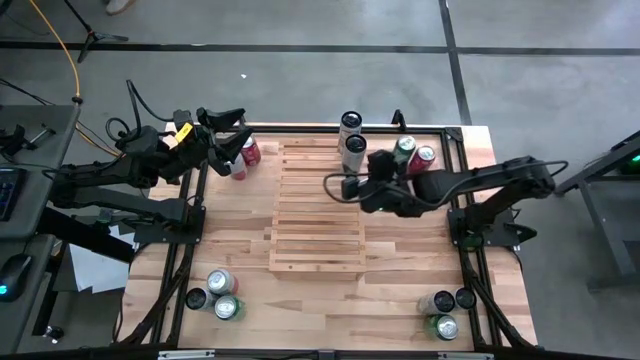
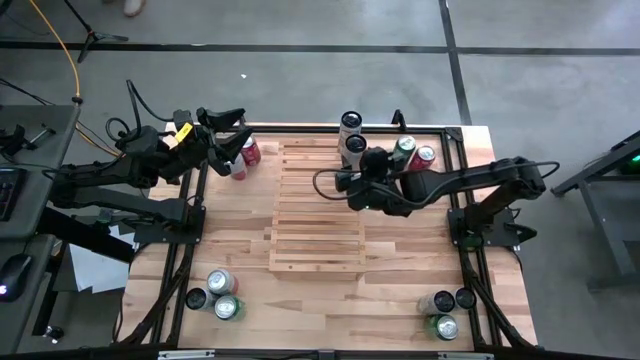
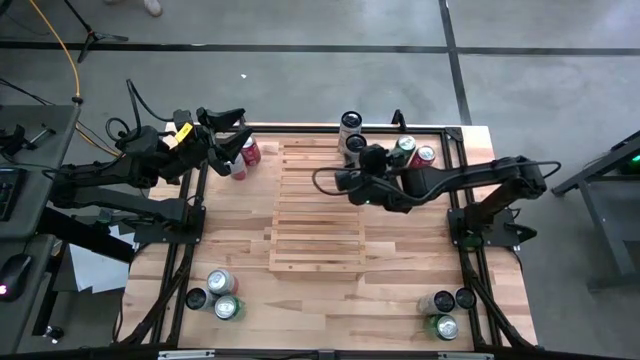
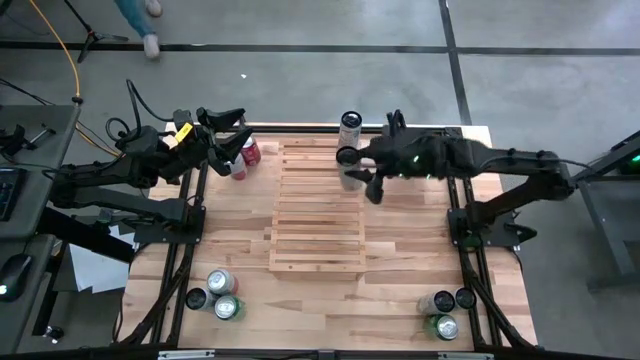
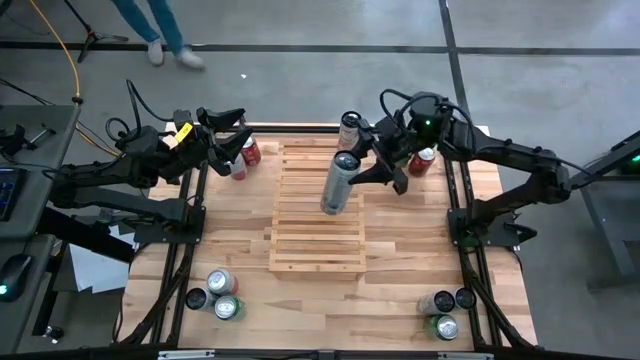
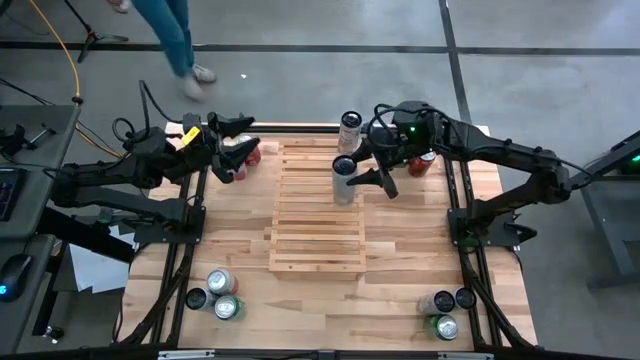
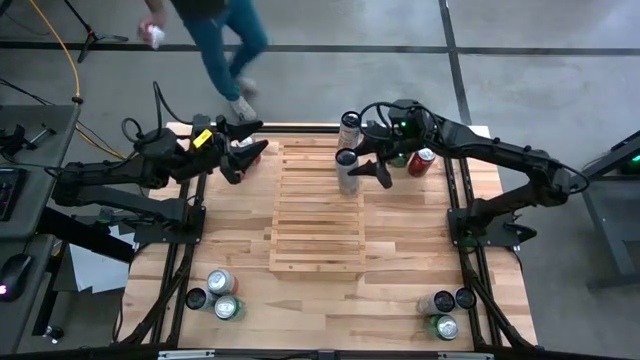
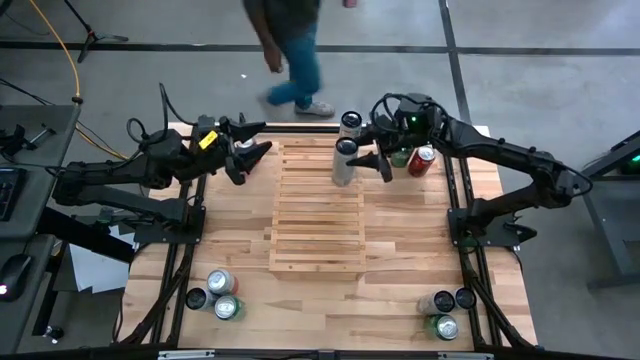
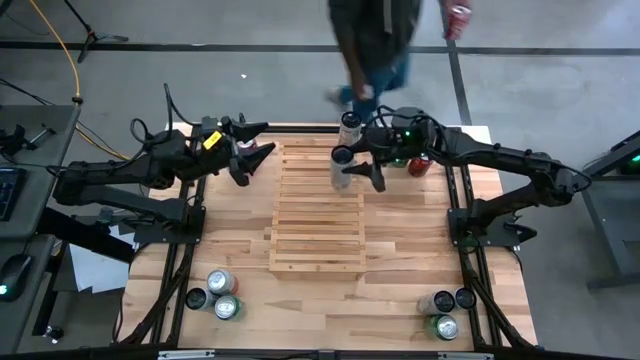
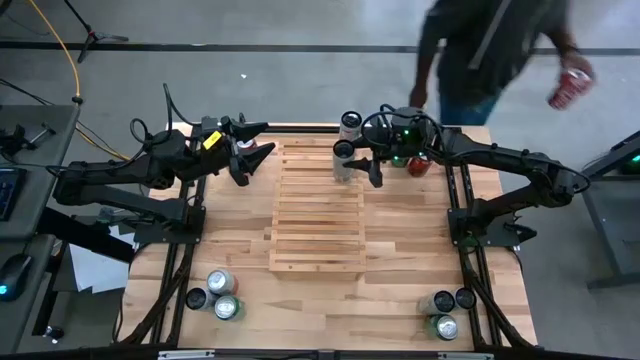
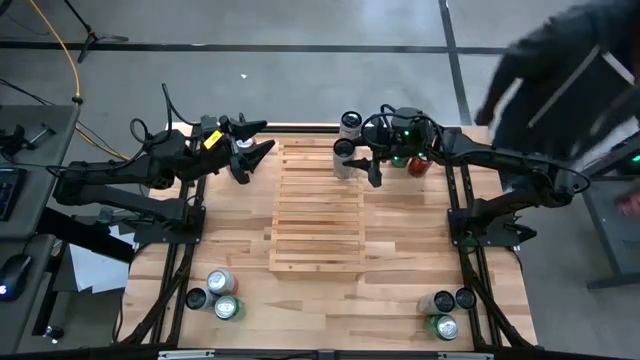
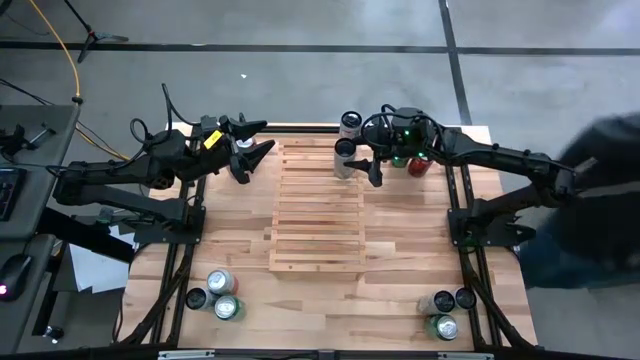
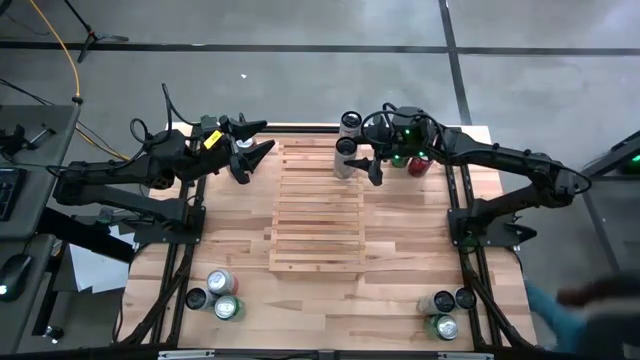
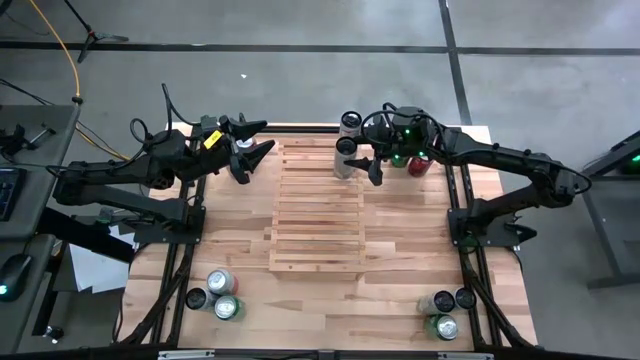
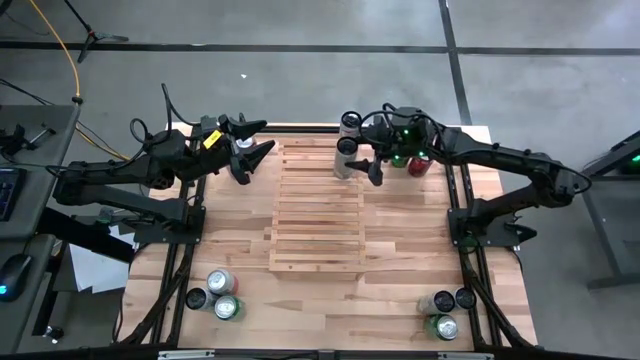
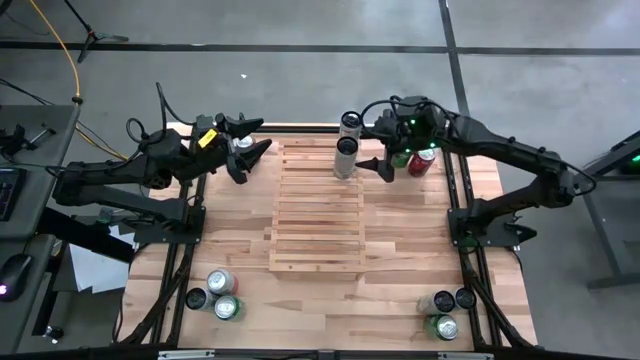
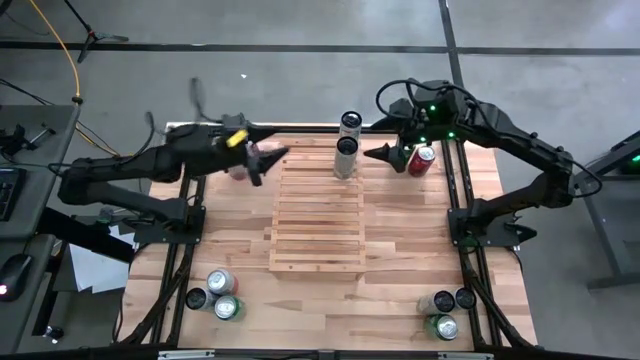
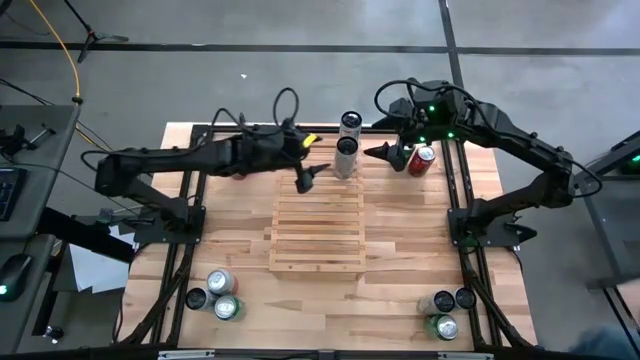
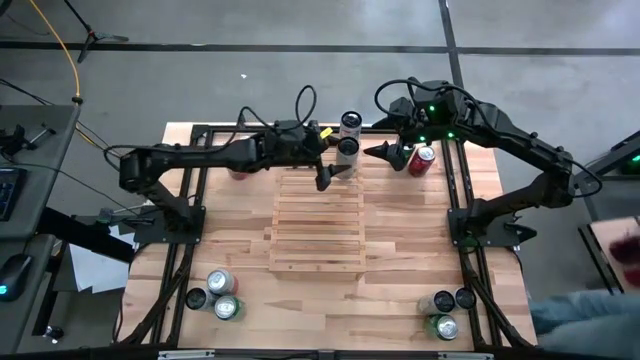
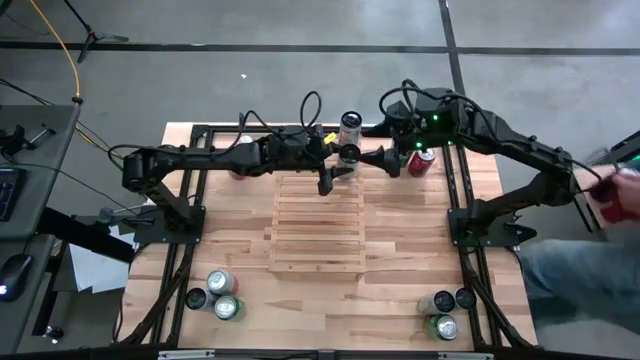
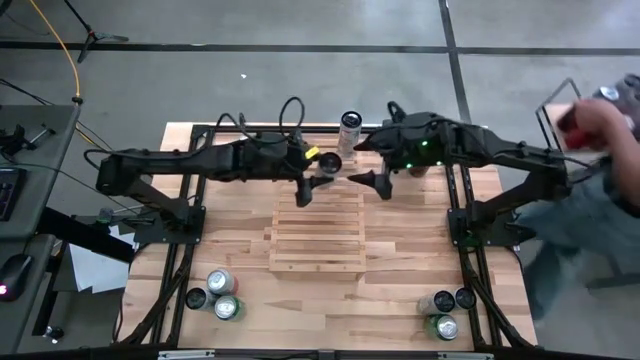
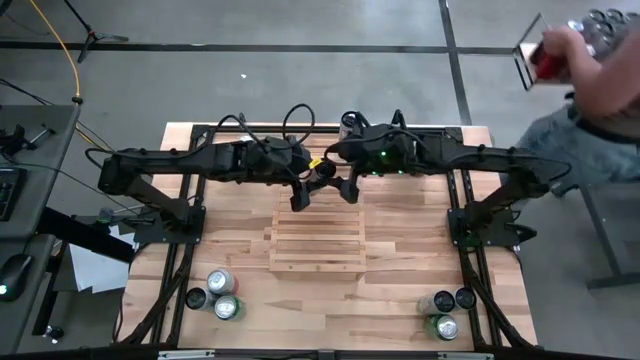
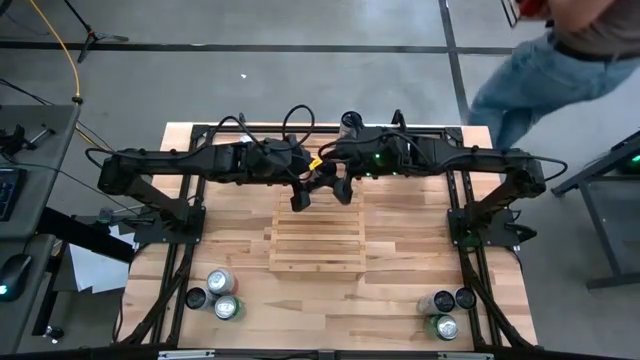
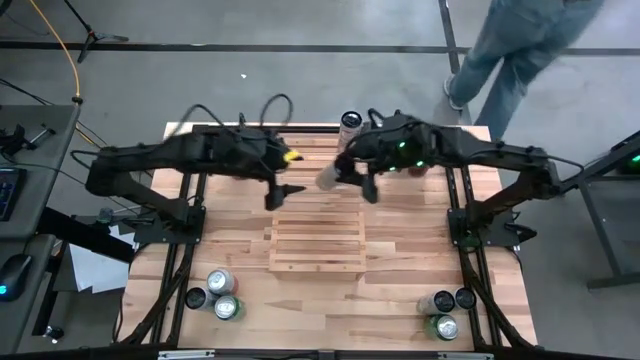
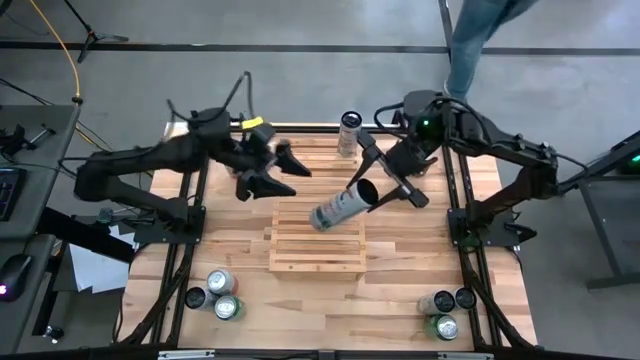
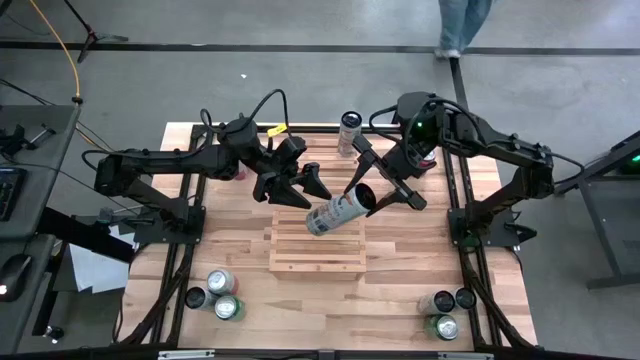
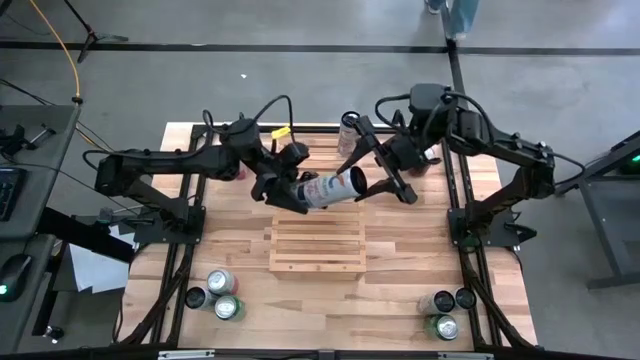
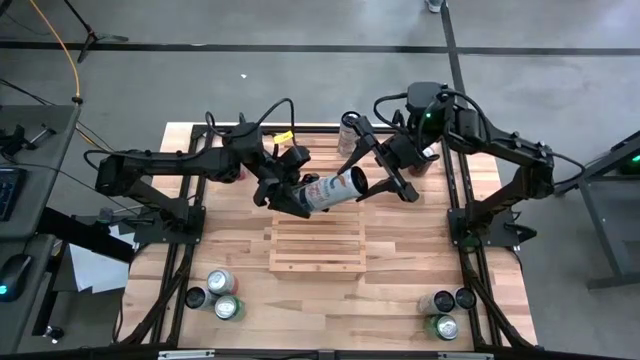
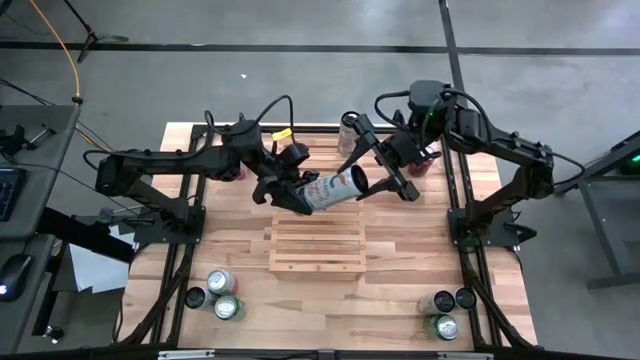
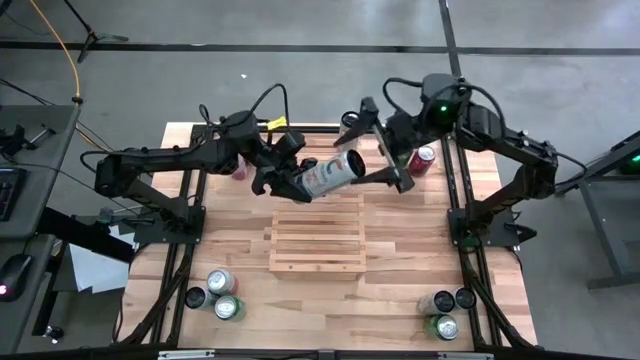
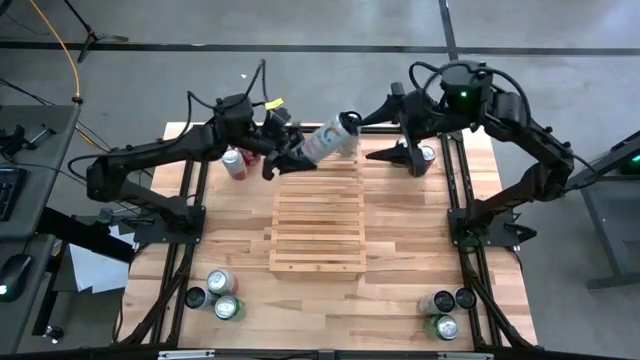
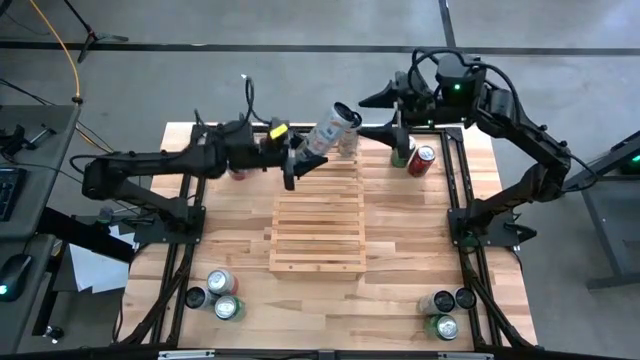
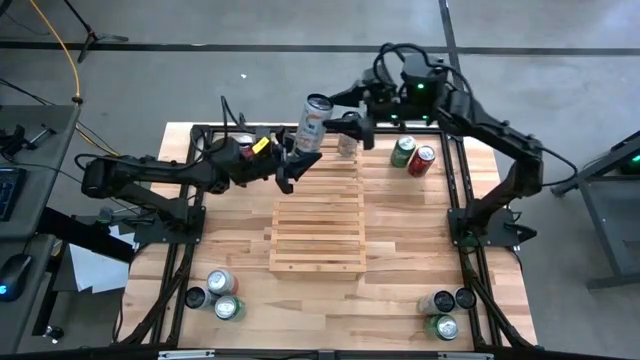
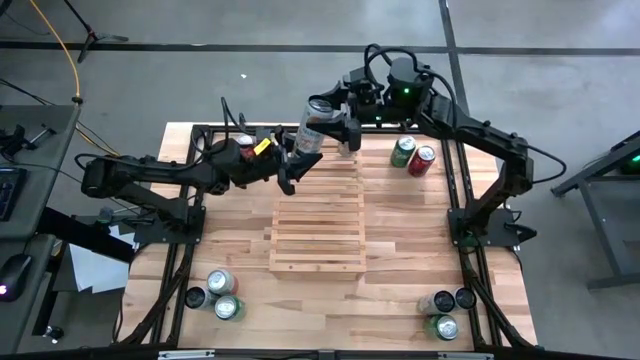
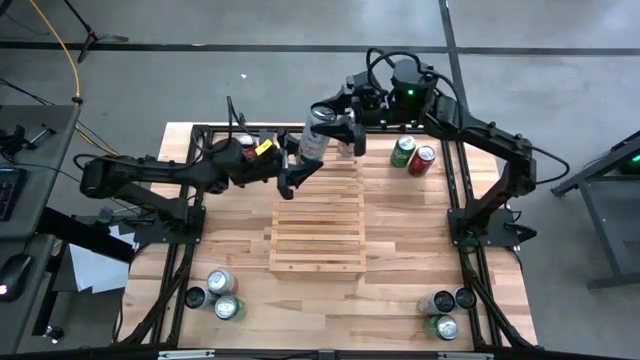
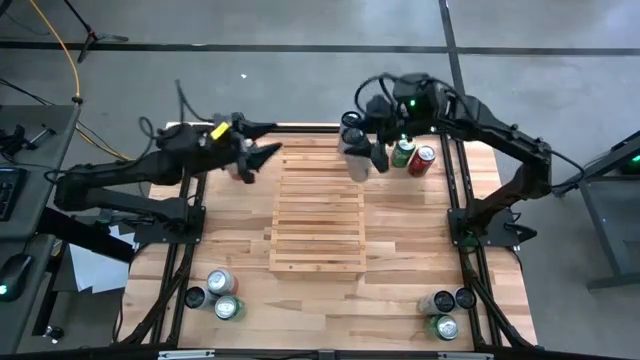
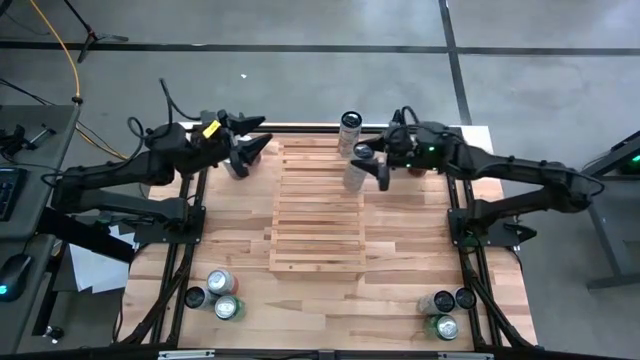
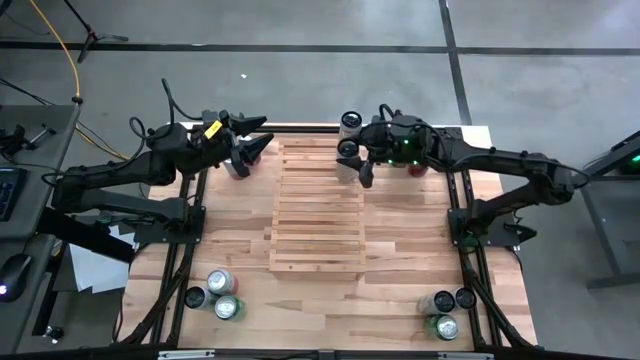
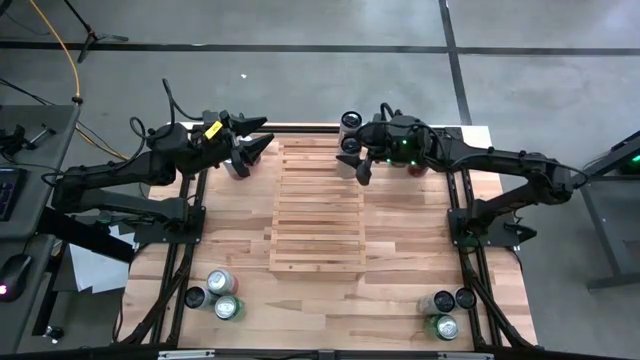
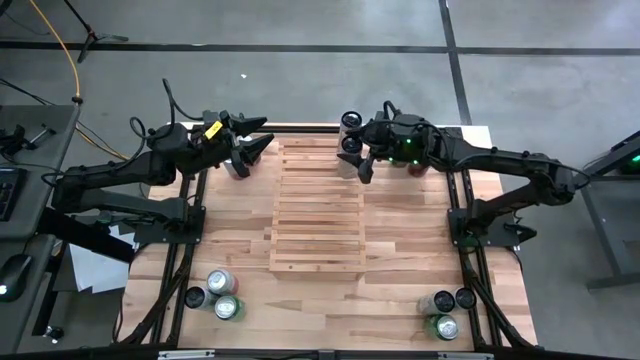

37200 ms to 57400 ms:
Task: Place canned beverage on shelf
Put the white pink soda can on the shelf
